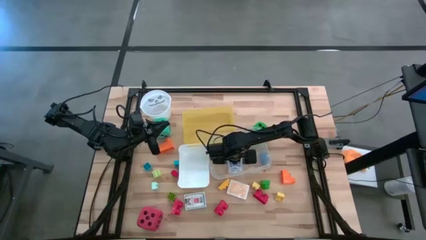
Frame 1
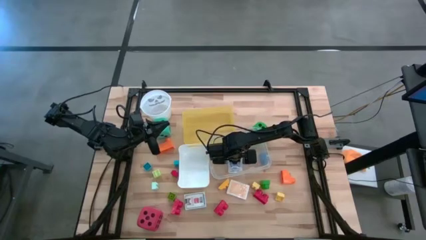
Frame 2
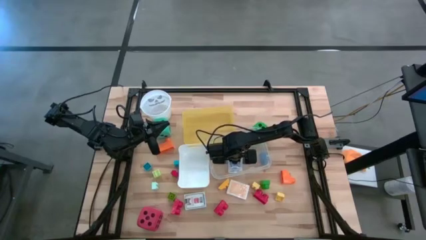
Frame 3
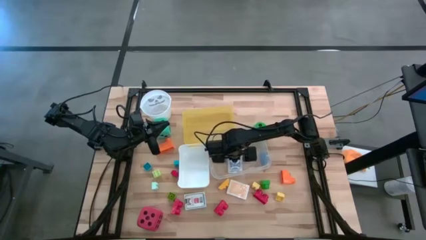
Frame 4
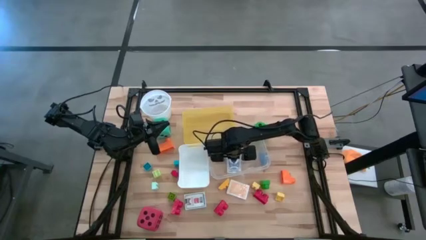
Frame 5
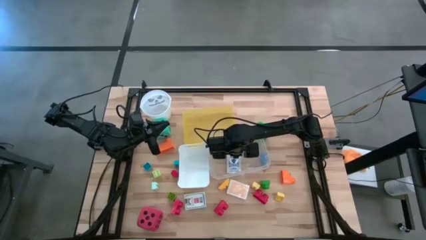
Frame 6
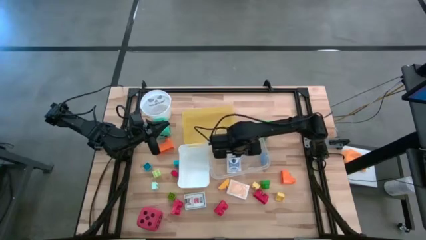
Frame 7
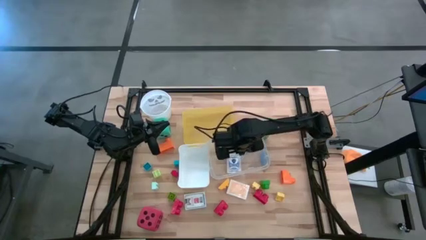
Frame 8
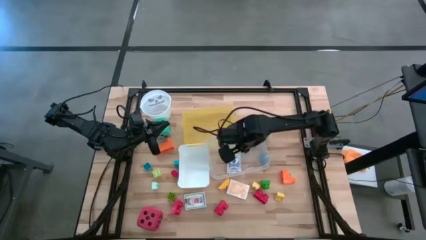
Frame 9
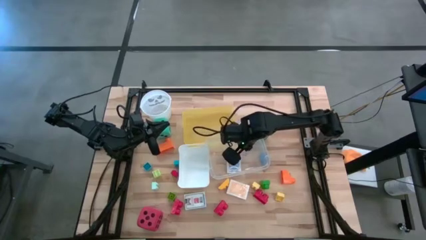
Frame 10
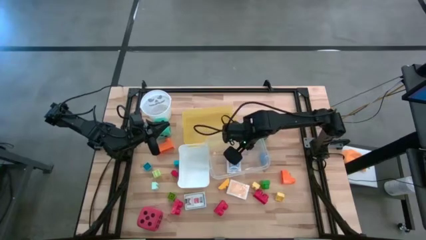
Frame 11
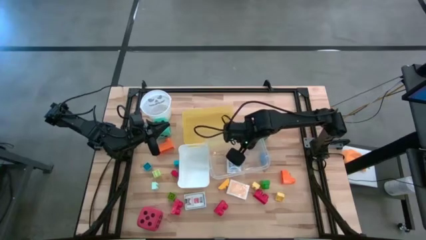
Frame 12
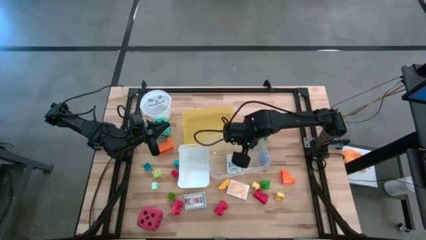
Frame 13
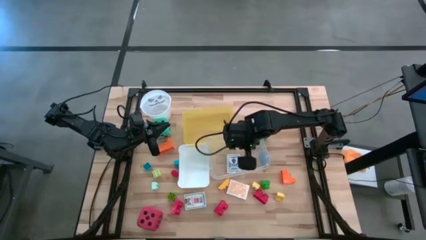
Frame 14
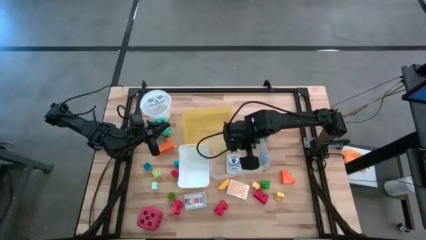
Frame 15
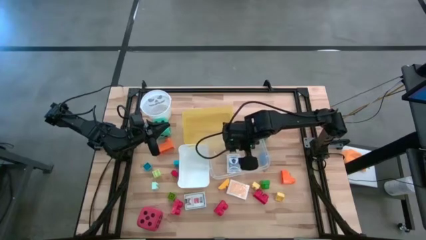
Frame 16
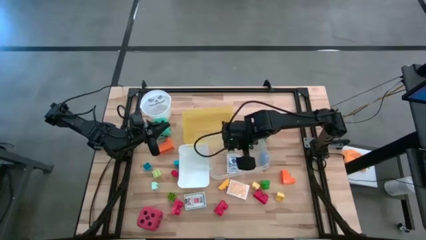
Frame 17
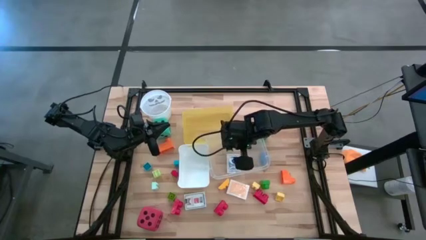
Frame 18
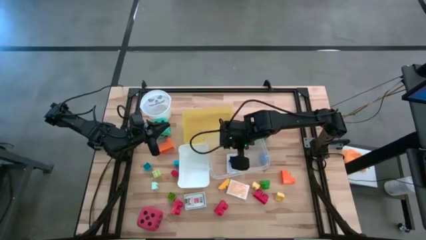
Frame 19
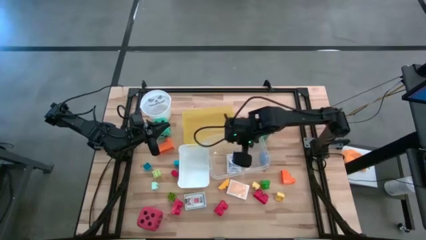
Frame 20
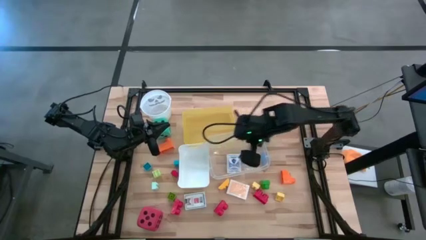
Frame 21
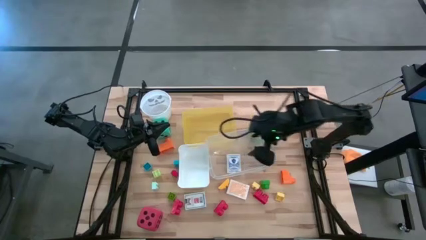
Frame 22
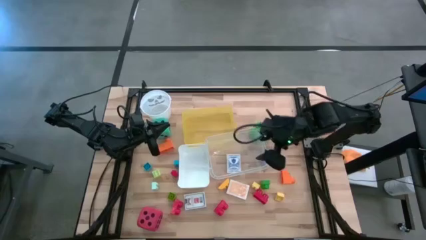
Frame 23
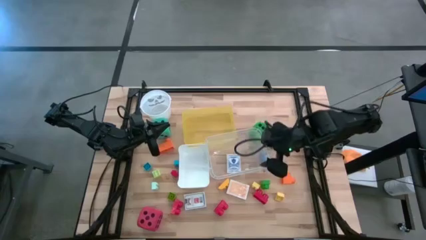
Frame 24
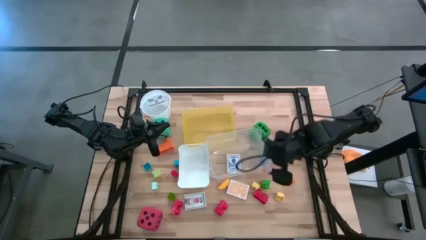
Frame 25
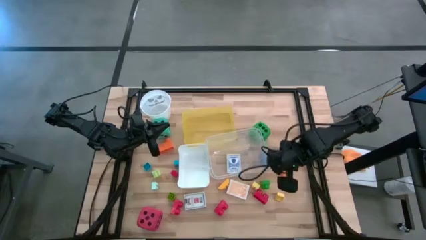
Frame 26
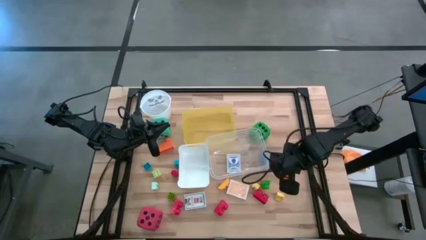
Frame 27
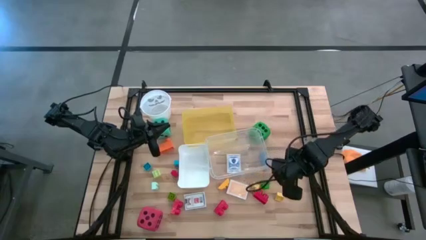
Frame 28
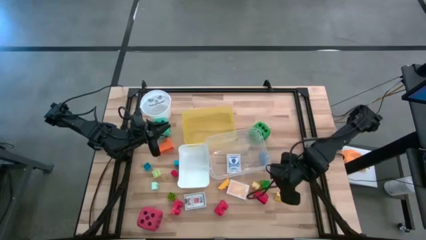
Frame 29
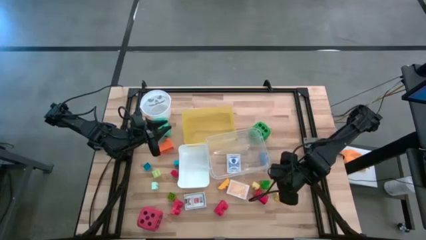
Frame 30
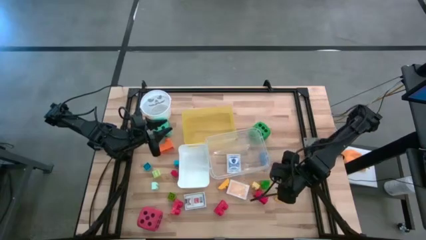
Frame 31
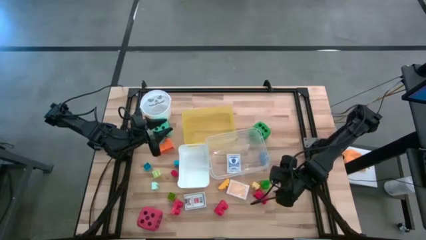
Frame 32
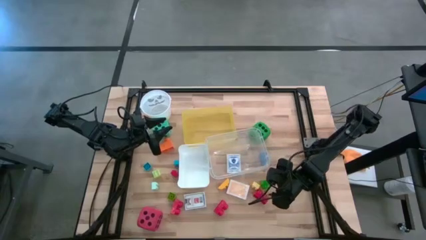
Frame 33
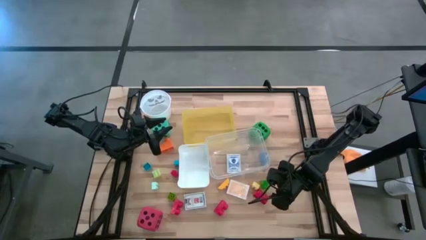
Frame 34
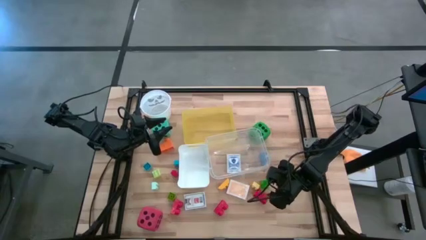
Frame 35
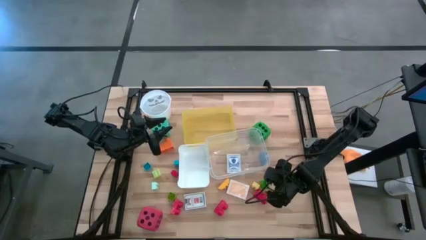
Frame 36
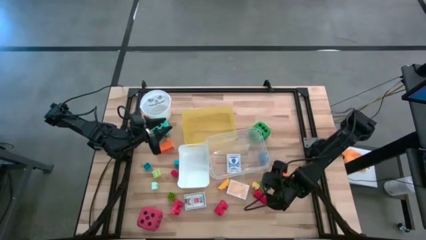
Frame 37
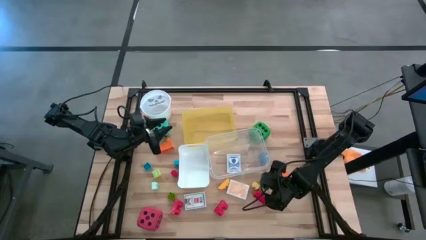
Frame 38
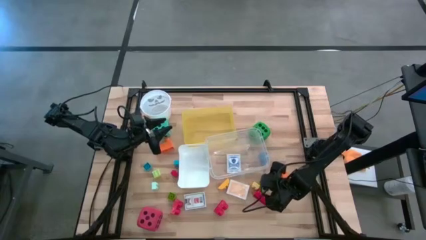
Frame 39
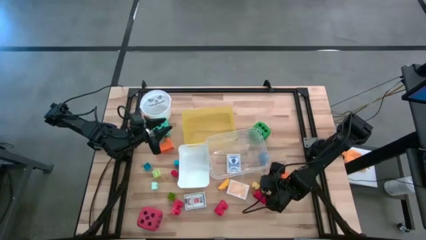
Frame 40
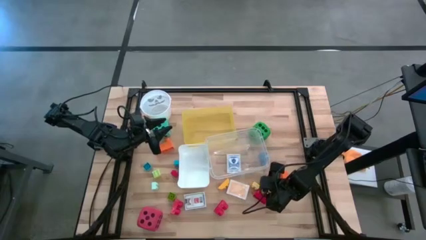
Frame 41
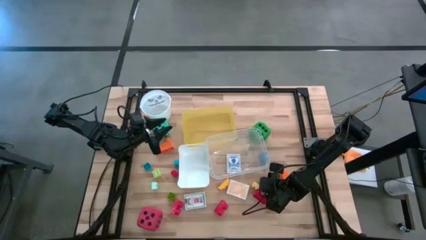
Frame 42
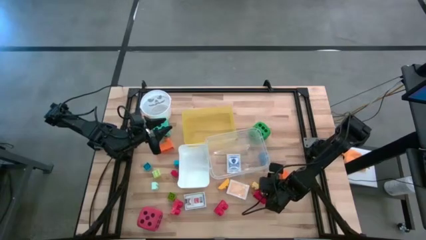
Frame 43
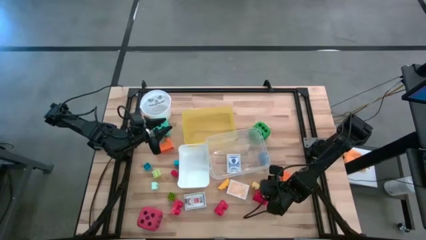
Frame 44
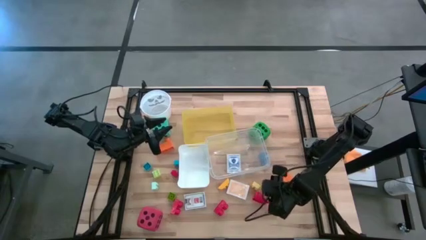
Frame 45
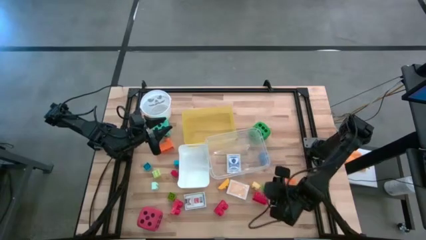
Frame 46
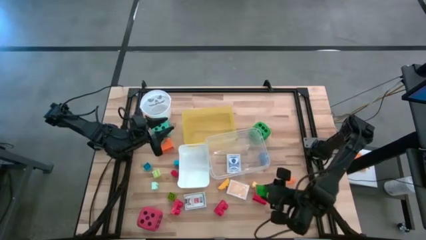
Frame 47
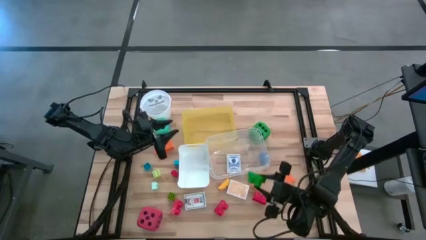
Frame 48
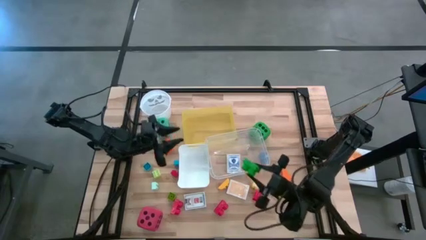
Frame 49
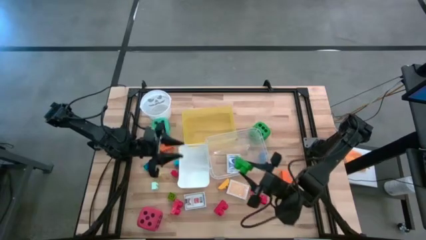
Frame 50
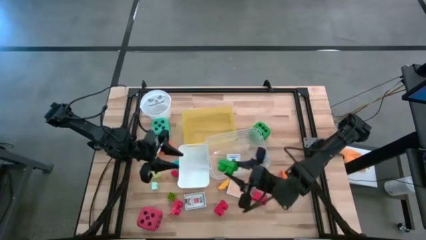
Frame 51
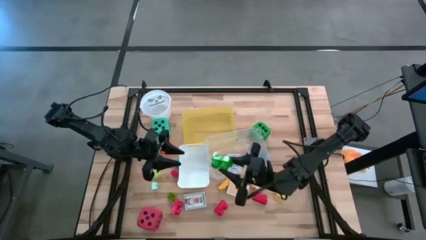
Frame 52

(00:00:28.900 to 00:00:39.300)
Task: Pick & Place Toys
Put the green game piece into the yellow bin

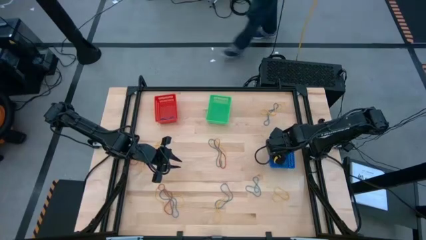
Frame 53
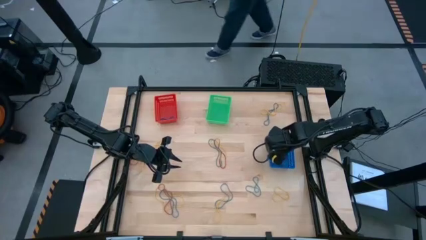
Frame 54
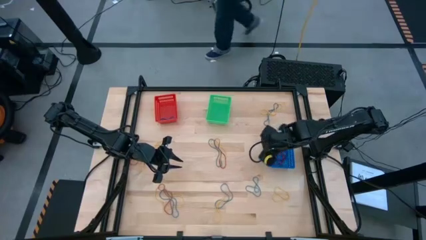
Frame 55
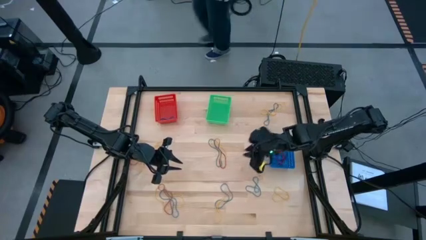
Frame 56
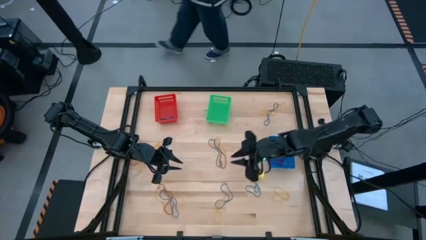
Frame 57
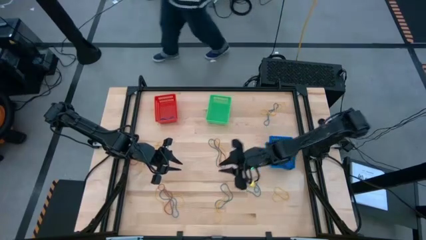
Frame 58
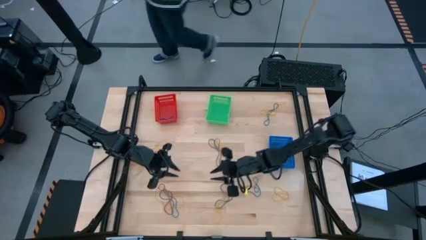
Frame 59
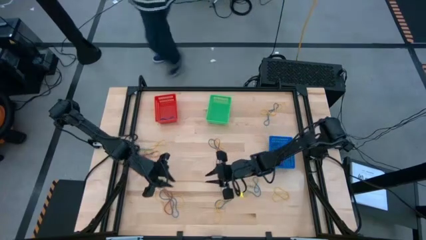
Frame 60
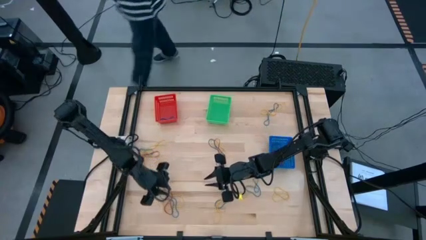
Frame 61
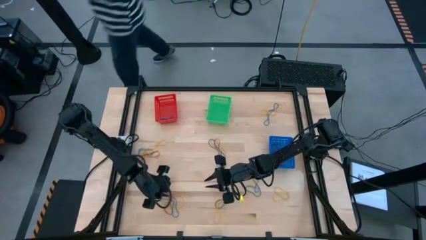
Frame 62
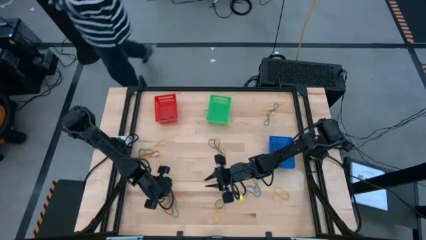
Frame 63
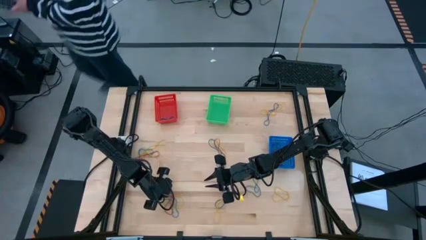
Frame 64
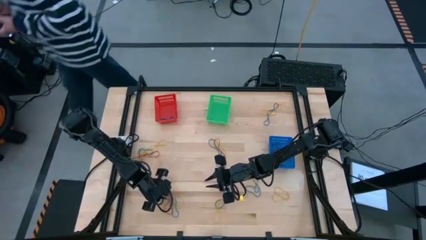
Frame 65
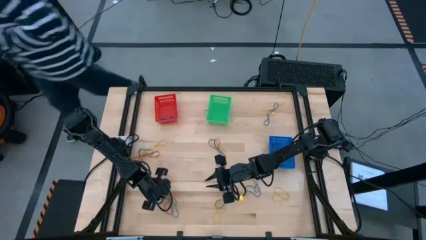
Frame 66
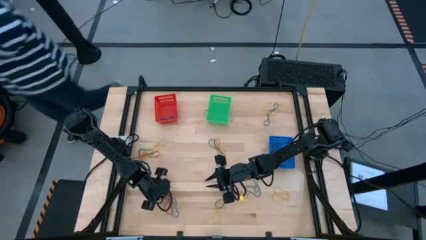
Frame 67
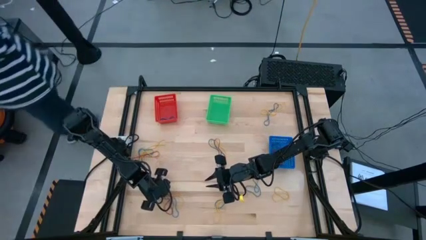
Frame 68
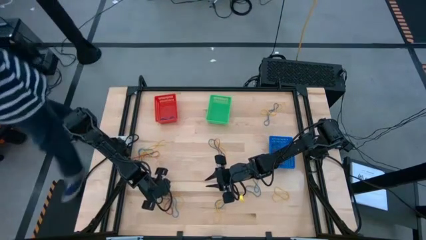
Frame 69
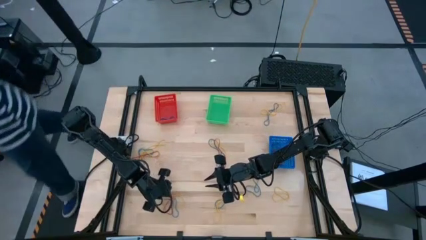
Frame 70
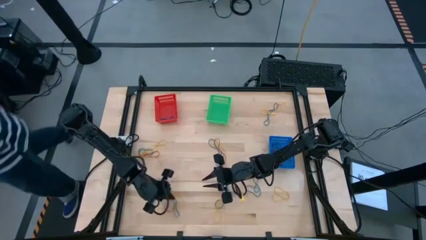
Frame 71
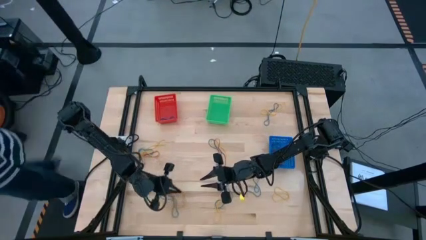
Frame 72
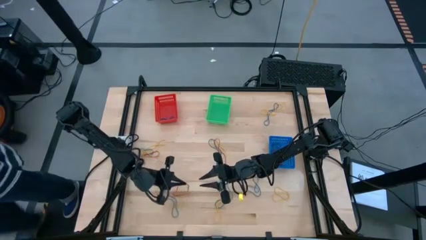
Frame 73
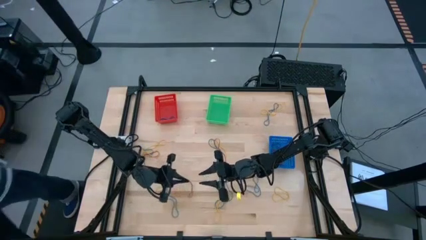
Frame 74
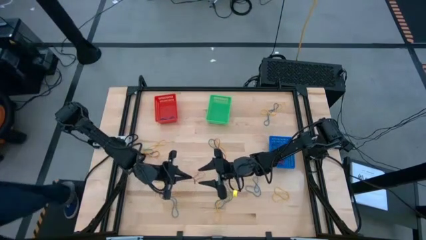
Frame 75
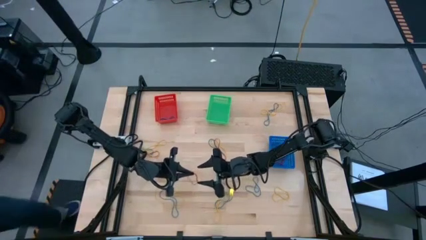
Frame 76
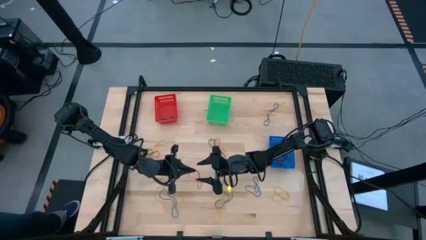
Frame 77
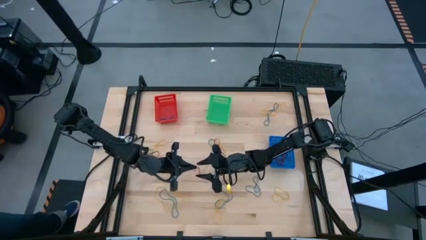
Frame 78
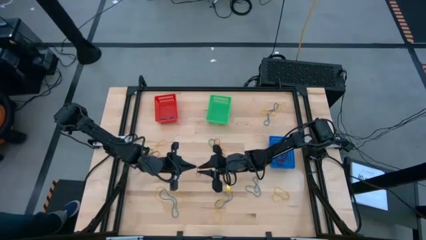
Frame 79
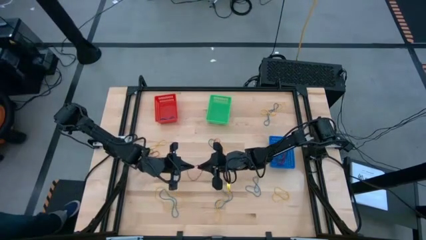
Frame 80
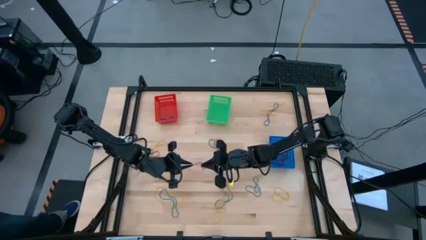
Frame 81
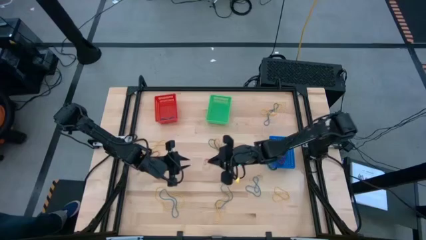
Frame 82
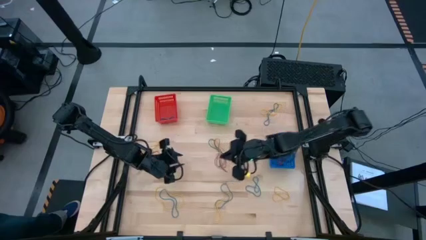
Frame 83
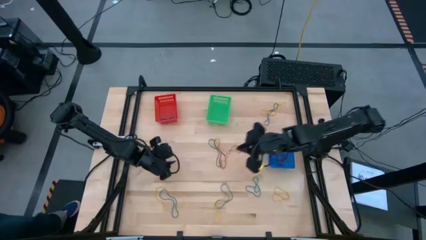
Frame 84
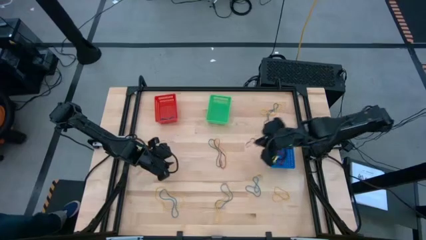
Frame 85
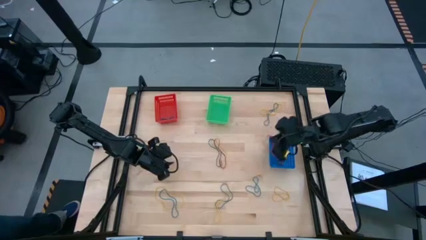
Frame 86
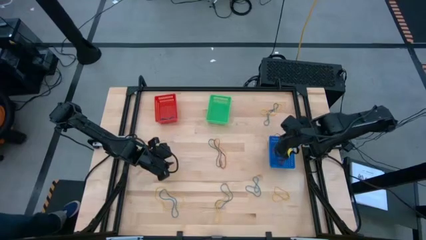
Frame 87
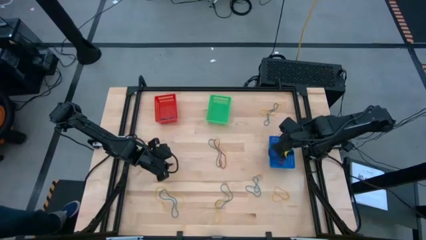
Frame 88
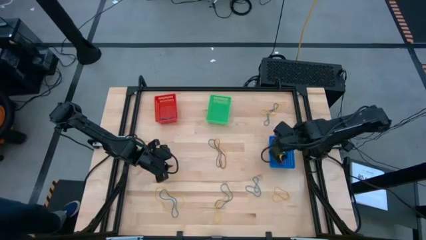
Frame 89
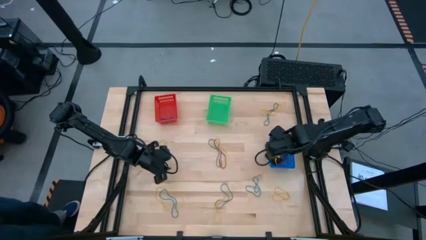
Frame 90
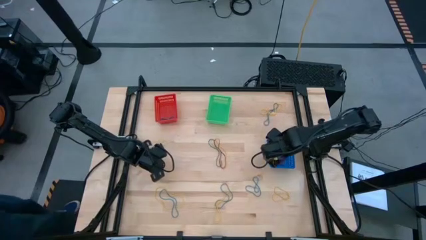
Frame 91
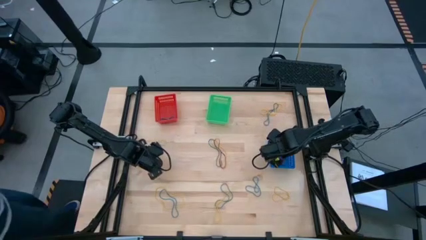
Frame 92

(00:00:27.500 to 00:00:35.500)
Task: Sort rubber bands into baskets
Put the red rubber band into the blue bin
